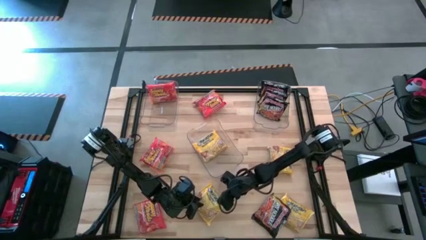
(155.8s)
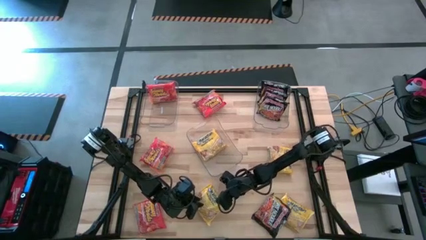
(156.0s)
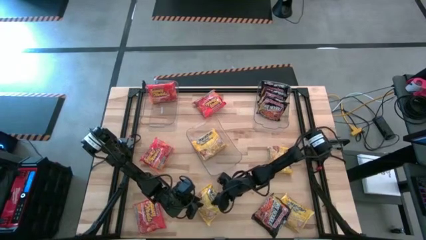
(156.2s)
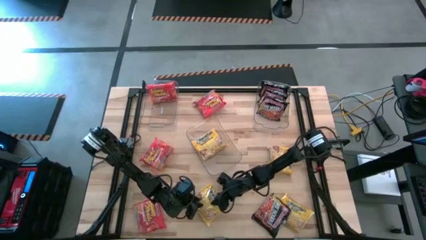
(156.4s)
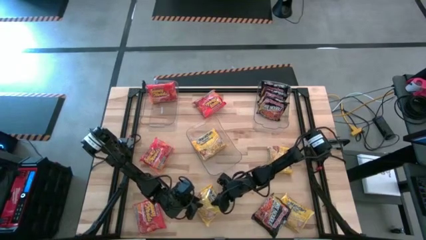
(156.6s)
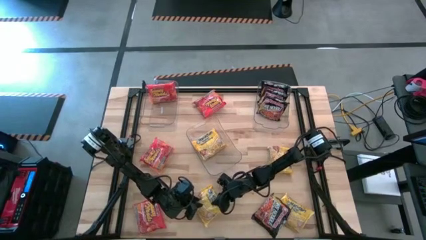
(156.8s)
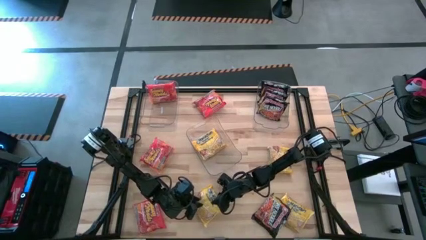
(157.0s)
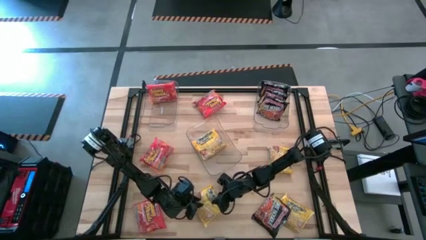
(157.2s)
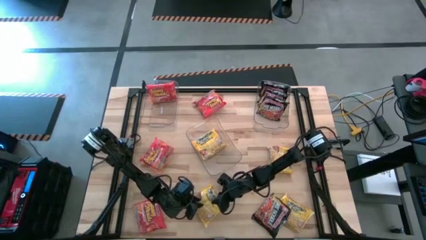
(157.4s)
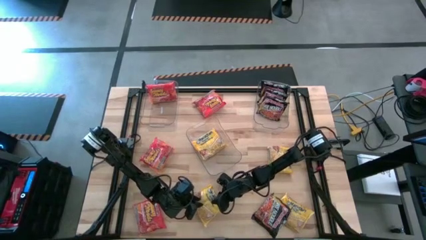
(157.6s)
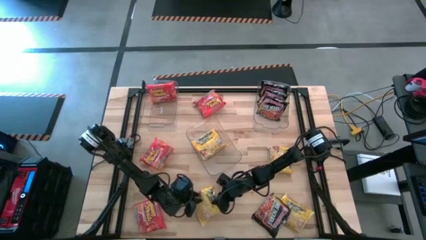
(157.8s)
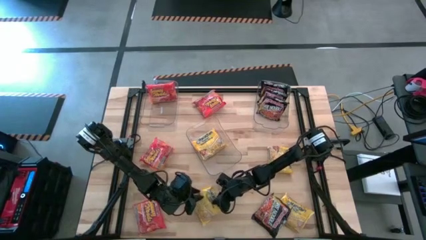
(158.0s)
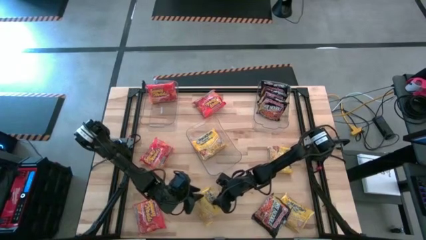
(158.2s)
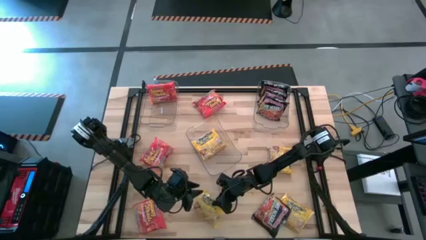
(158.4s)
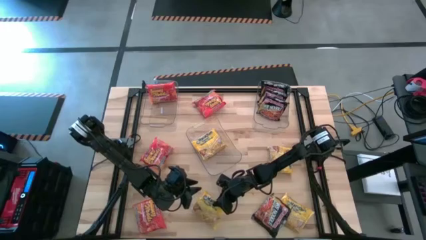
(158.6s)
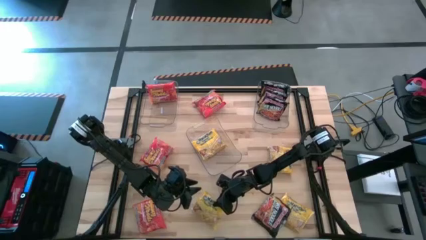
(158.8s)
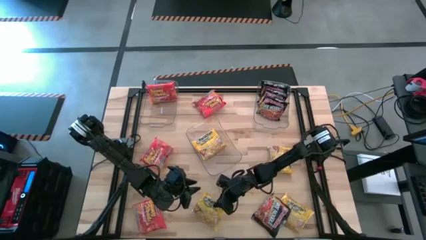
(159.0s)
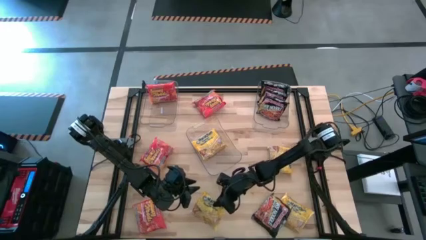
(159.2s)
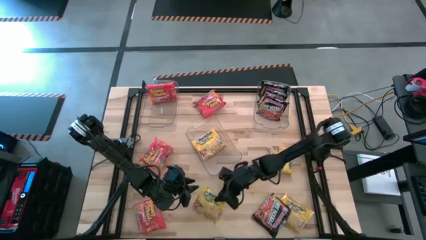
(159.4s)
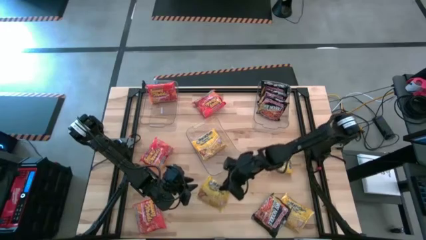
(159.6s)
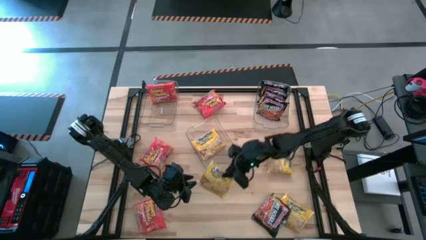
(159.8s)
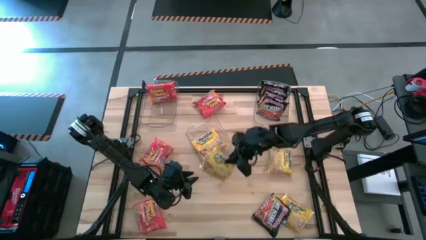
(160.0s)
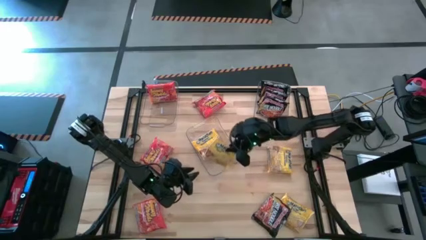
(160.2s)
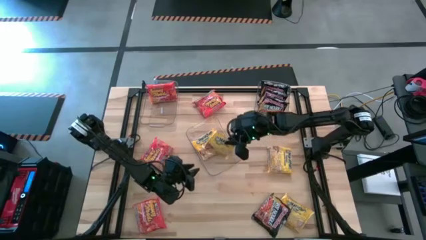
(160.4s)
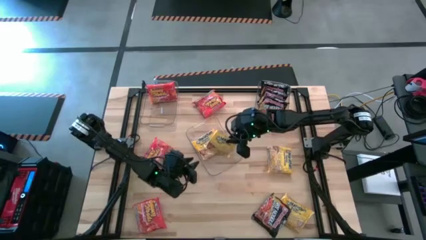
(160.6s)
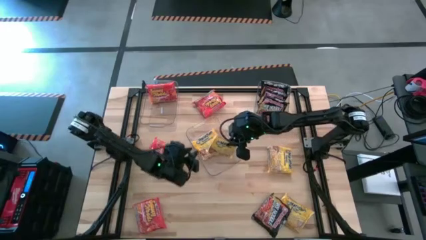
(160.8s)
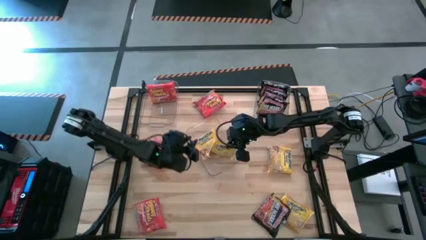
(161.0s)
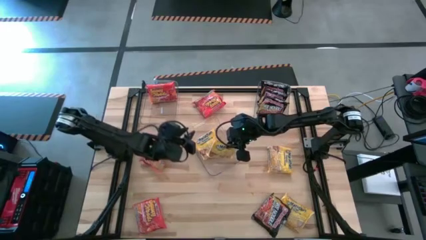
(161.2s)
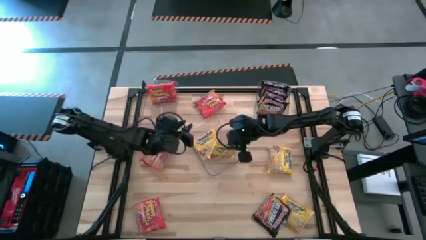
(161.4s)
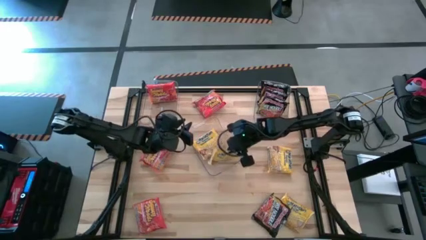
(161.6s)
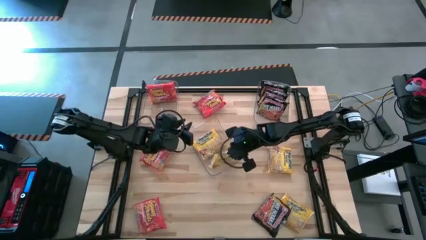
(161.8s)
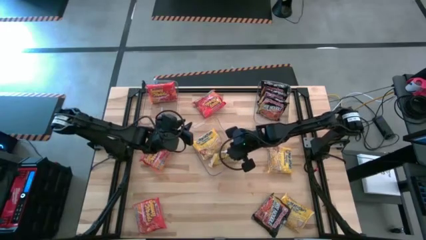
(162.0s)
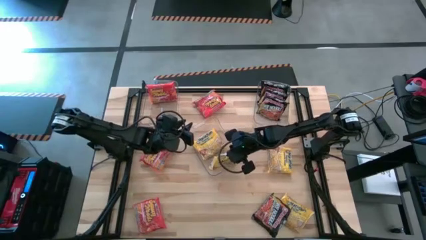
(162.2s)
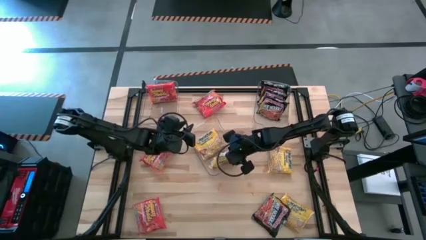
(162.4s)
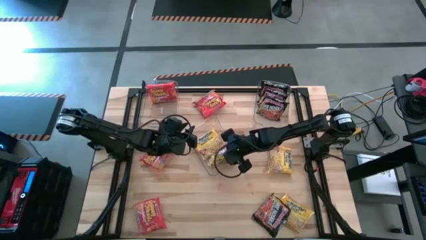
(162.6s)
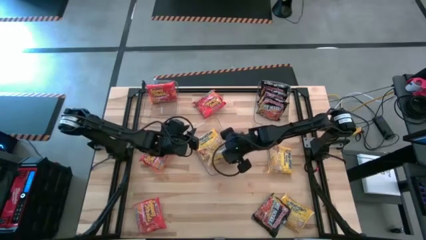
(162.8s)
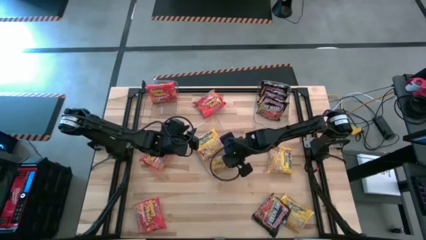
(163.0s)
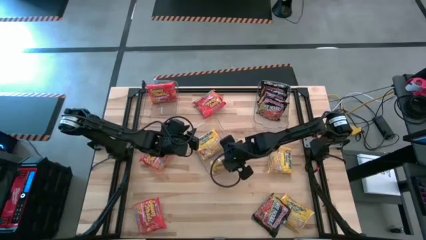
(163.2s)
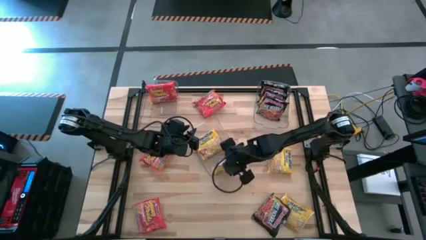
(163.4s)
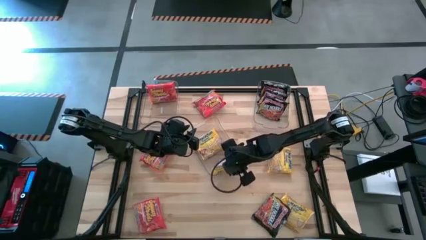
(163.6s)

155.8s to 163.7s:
Task: Sort Maruchan noodles
Put the bottom left yellow noodle pack into the center transparent bin

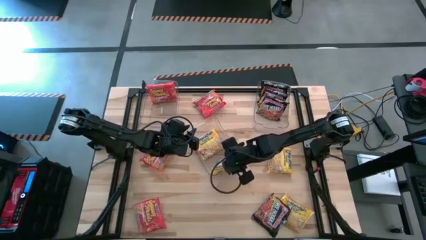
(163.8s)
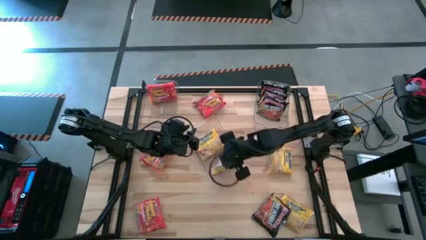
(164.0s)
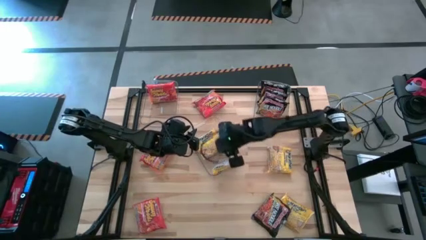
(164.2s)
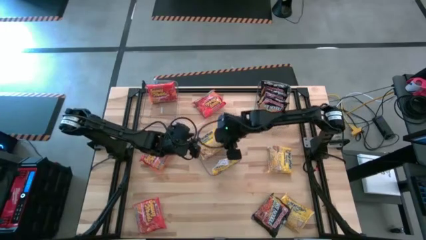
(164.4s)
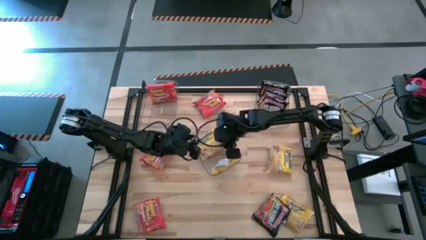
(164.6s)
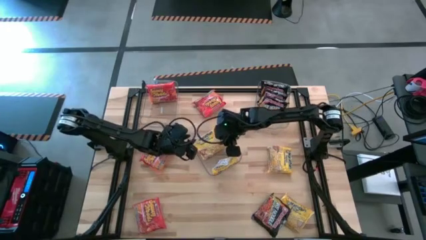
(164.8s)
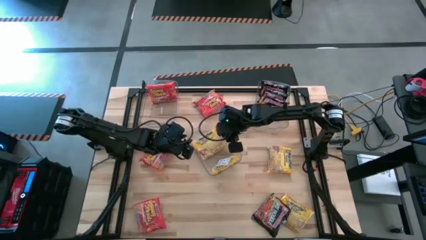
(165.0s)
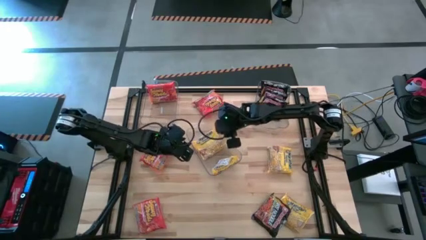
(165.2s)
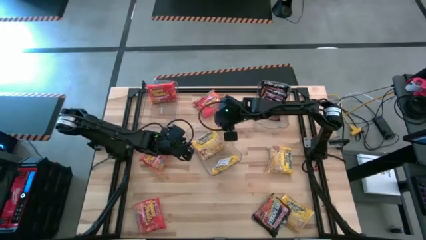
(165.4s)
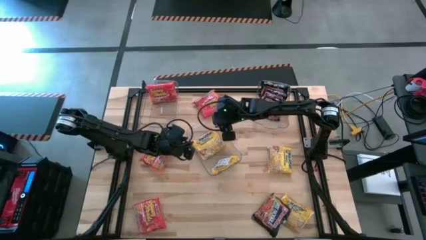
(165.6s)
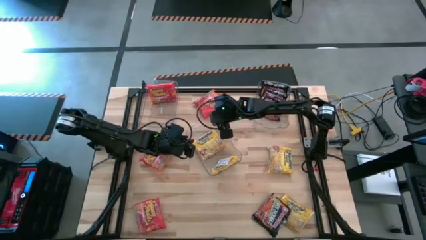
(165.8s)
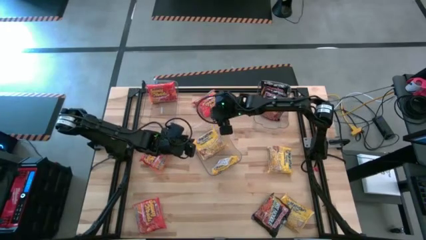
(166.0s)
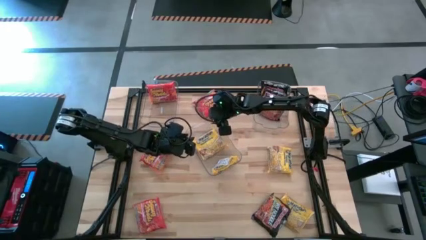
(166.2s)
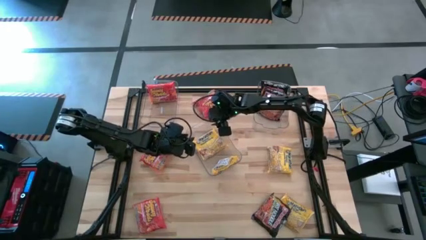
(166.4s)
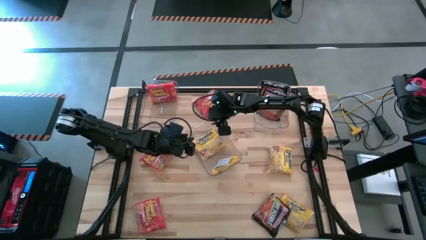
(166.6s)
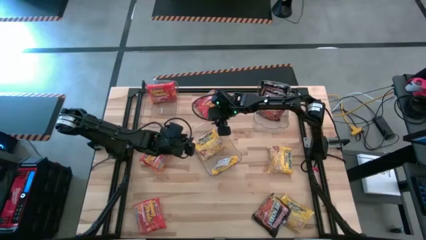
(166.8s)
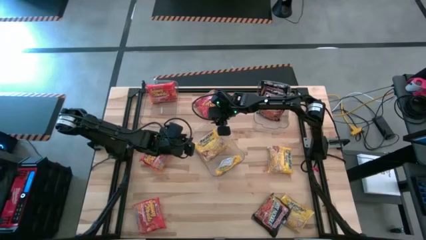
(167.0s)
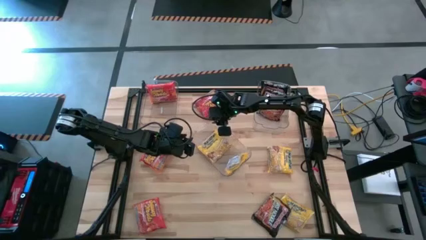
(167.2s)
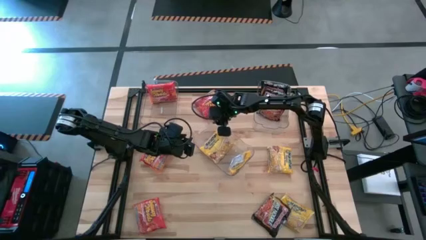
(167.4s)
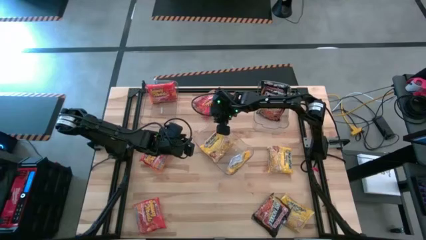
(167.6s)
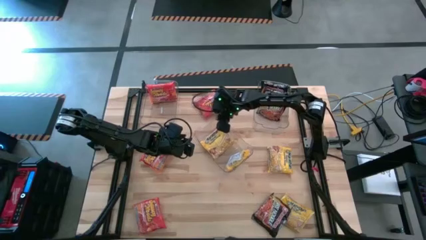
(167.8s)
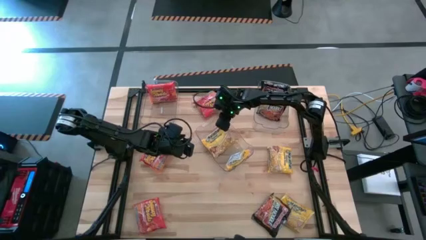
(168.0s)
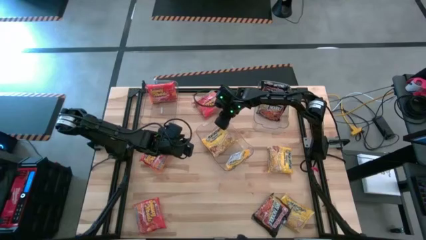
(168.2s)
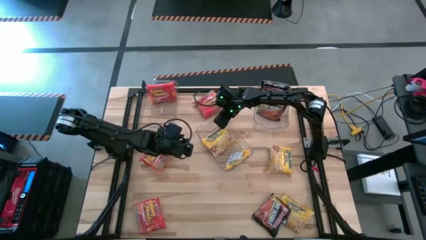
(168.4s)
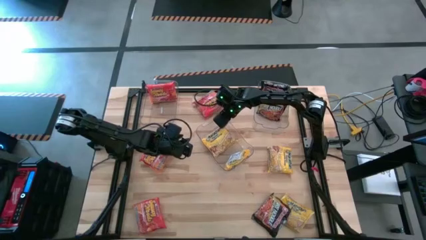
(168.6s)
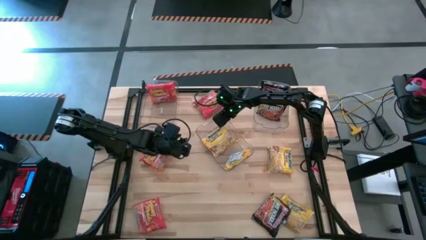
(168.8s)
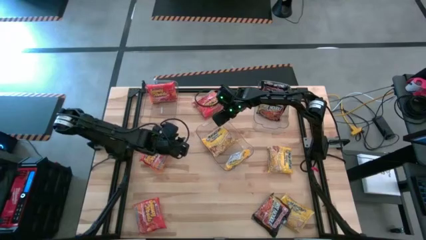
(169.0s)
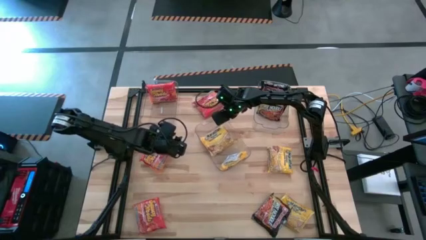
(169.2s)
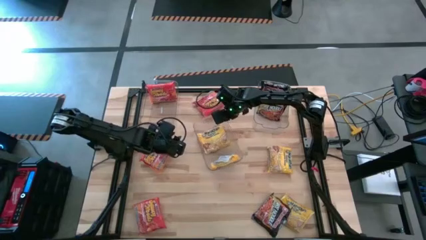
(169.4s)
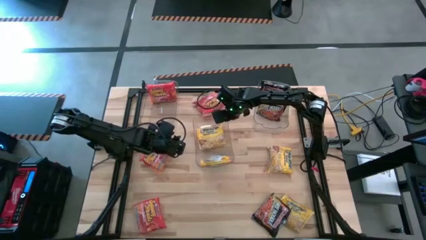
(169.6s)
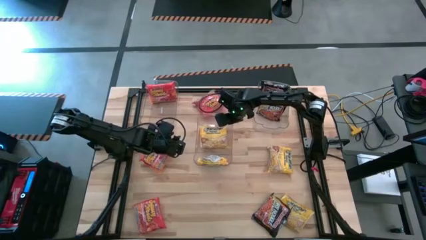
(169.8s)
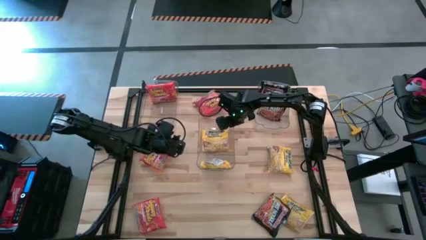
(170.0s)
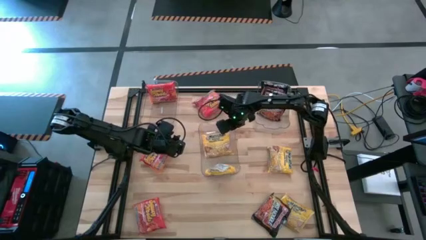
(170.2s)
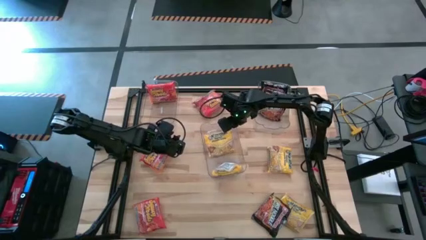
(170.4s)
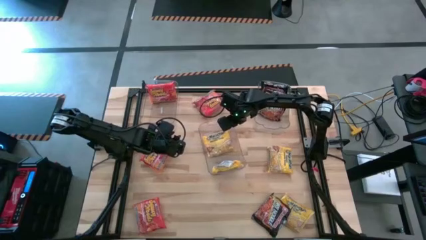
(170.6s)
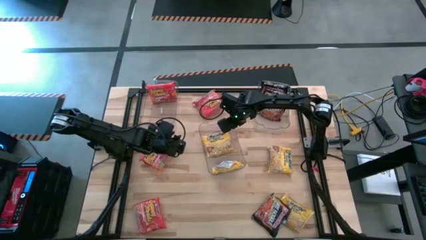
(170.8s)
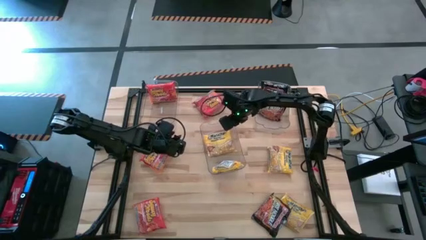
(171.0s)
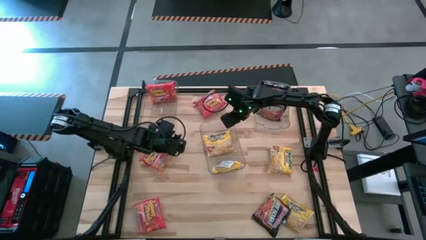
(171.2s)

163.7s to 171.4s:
Adjust the center transparent bin

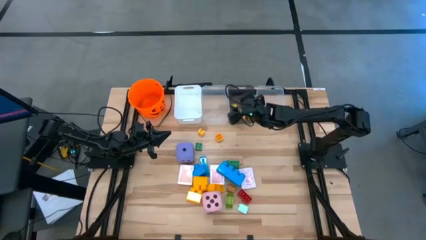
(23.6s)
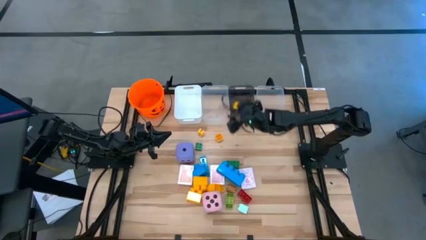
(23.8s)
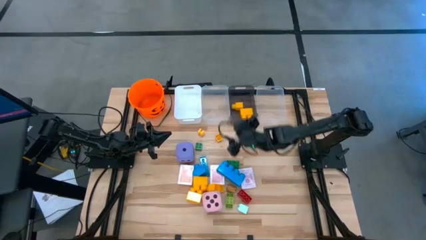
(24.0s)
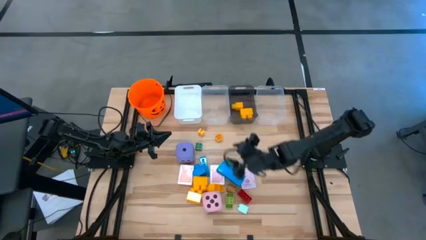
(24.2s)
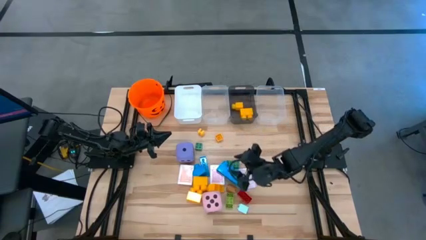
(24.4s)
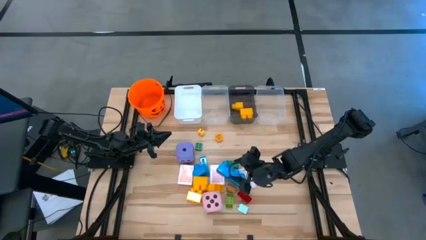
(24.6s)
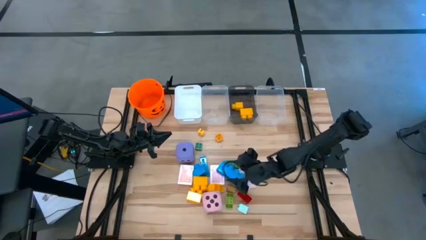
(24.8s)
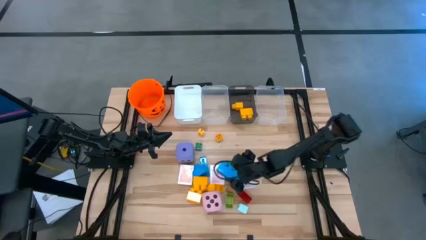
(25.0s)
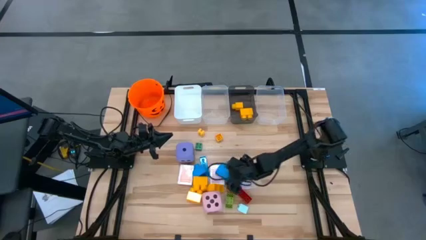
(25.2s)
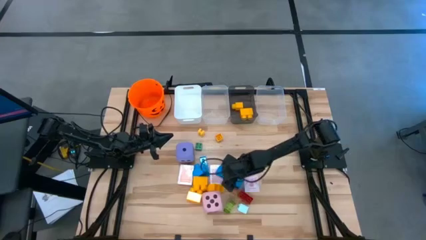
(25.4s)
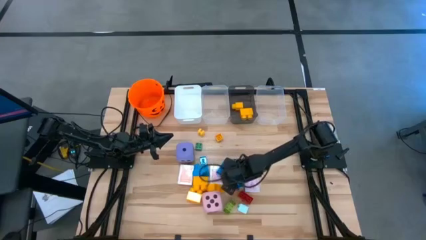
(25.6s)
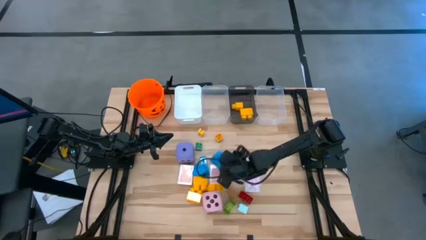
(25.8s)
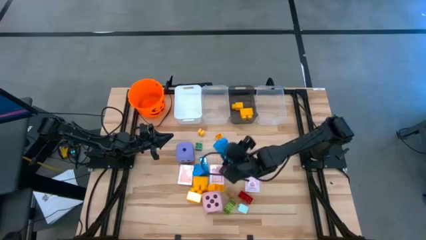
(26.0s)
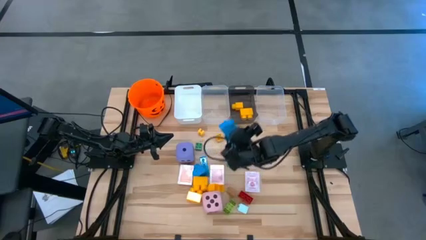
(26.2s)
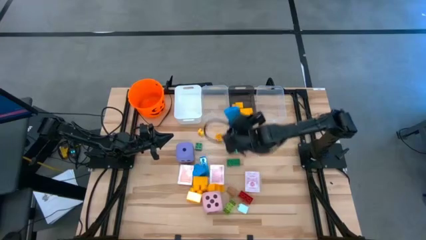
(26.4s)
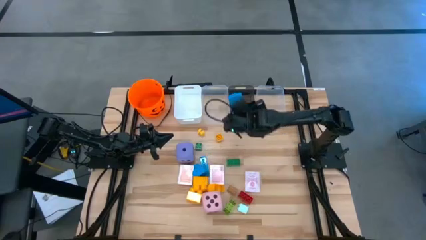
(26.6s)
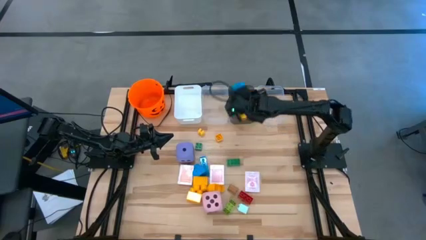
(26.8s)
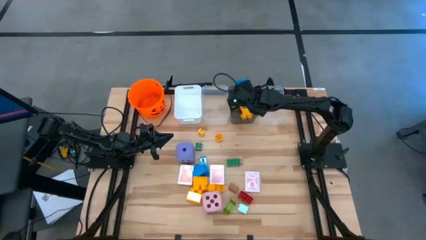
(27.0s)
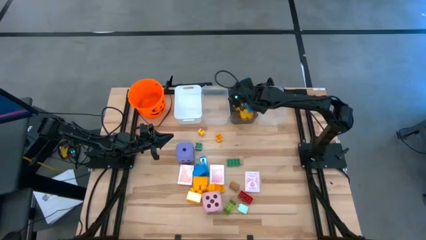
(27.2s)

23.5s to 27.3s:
Task: Pick & Place Toys
Put the large blue game piece into the black bin
